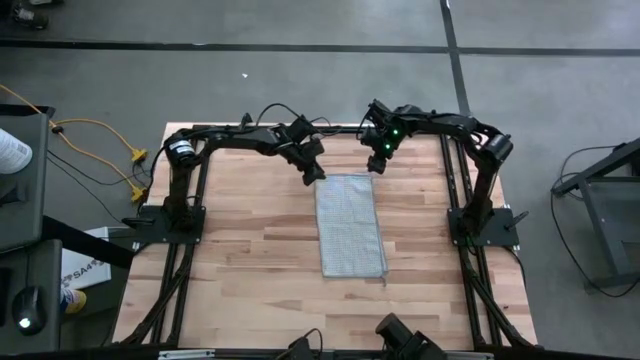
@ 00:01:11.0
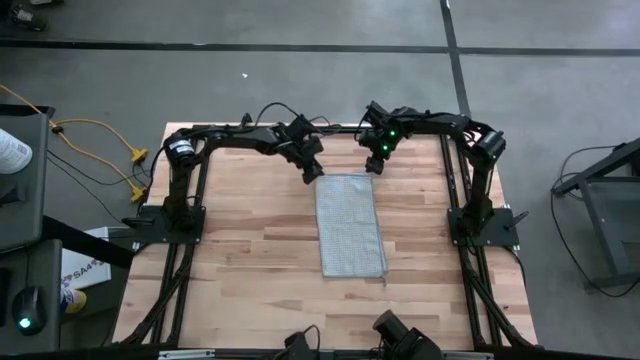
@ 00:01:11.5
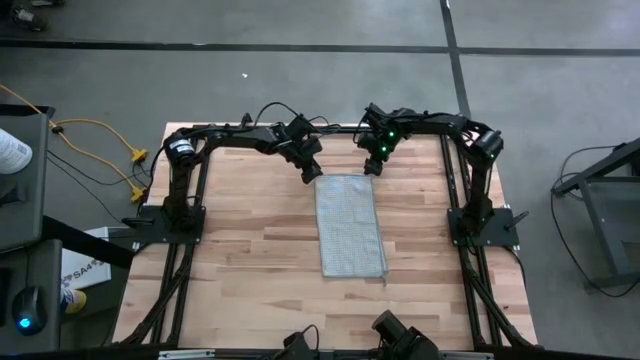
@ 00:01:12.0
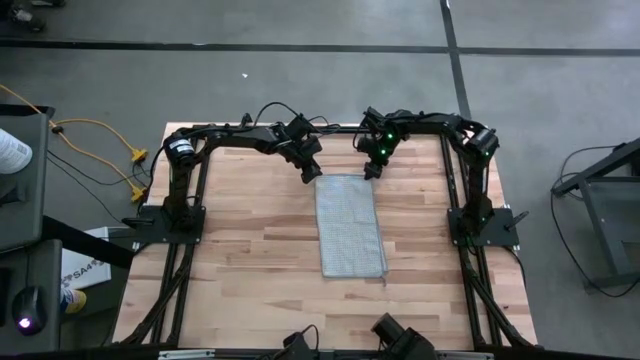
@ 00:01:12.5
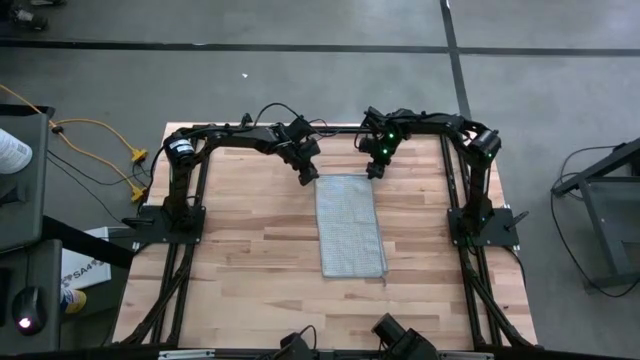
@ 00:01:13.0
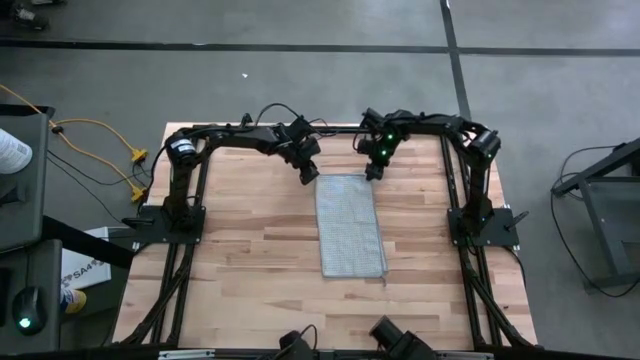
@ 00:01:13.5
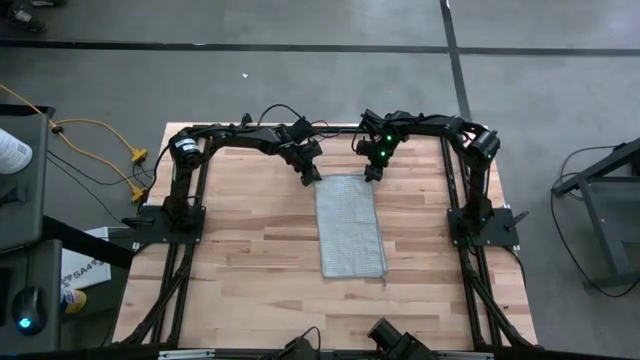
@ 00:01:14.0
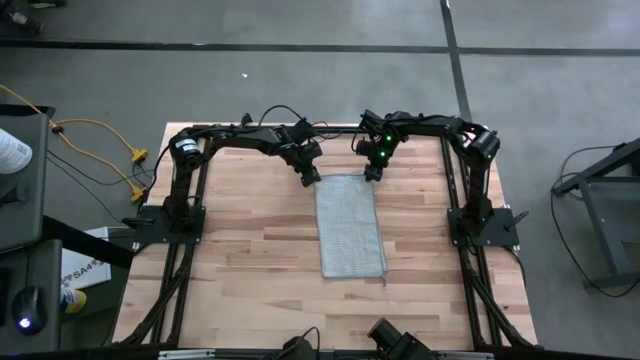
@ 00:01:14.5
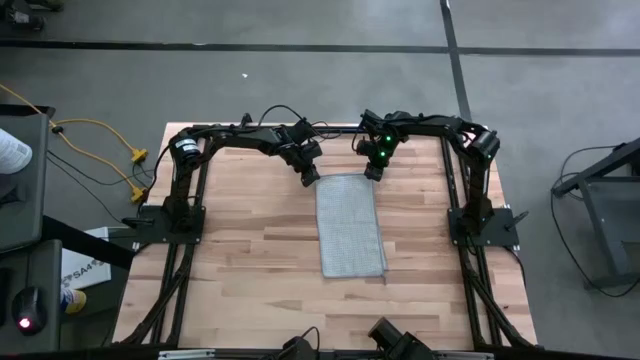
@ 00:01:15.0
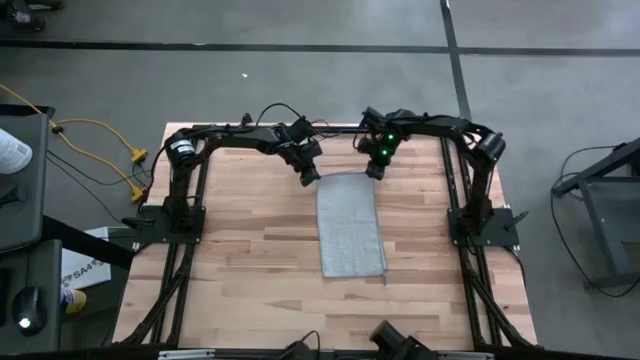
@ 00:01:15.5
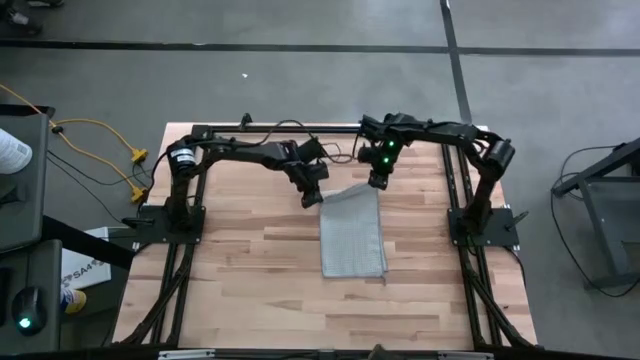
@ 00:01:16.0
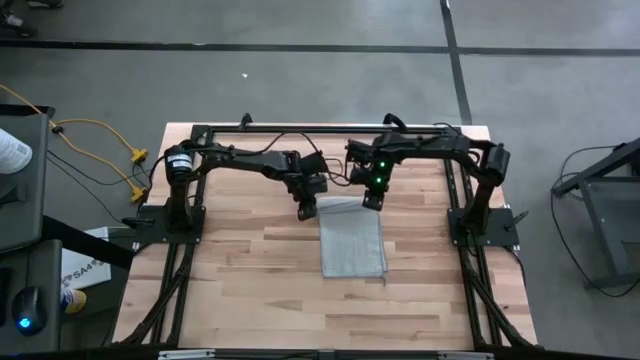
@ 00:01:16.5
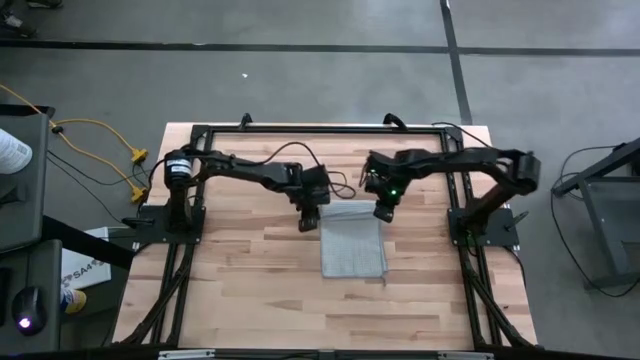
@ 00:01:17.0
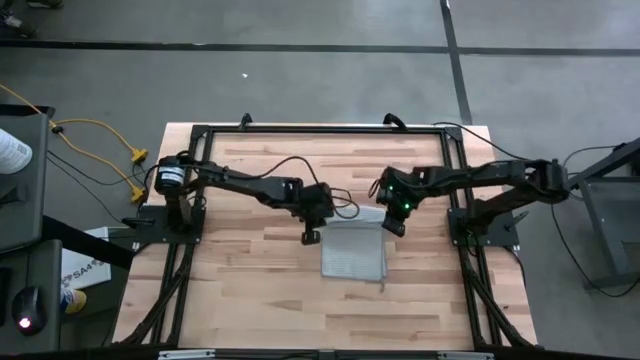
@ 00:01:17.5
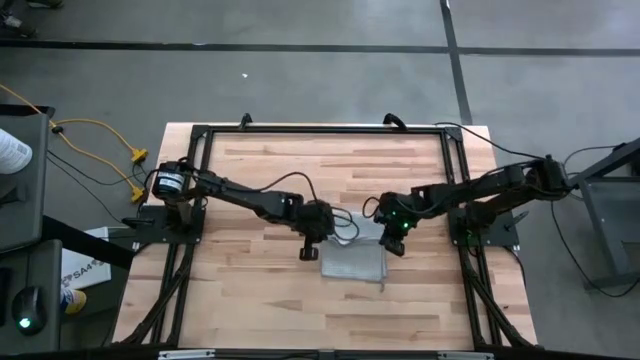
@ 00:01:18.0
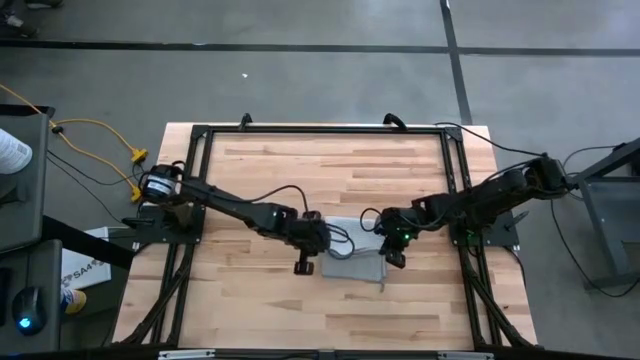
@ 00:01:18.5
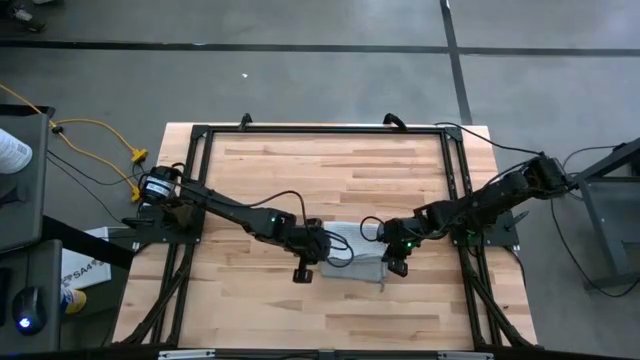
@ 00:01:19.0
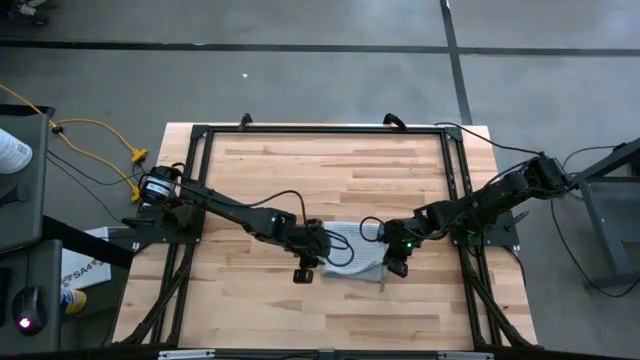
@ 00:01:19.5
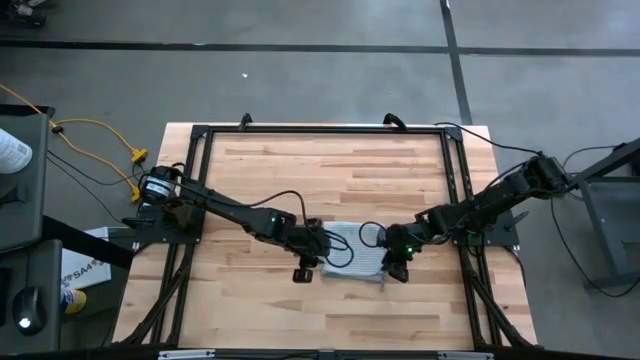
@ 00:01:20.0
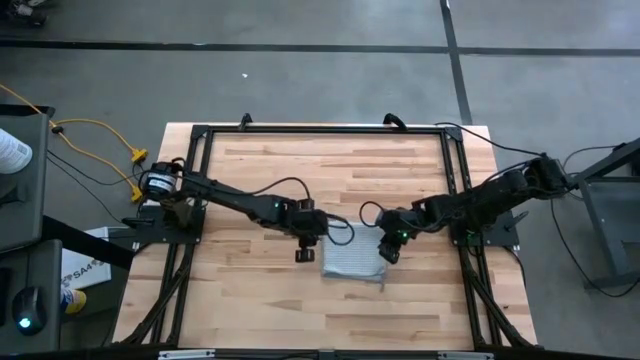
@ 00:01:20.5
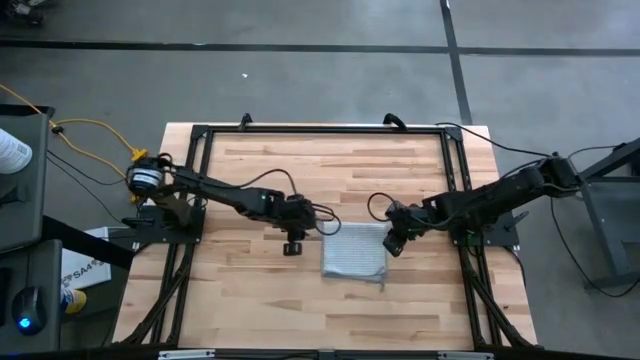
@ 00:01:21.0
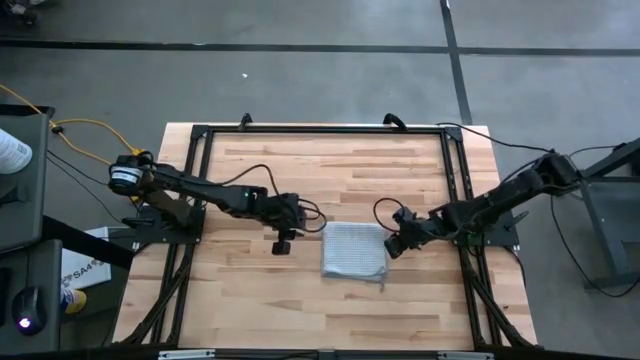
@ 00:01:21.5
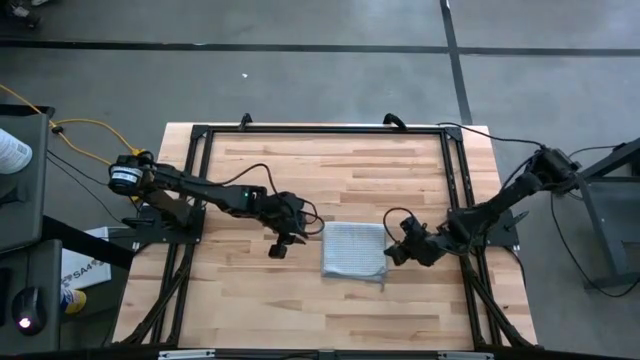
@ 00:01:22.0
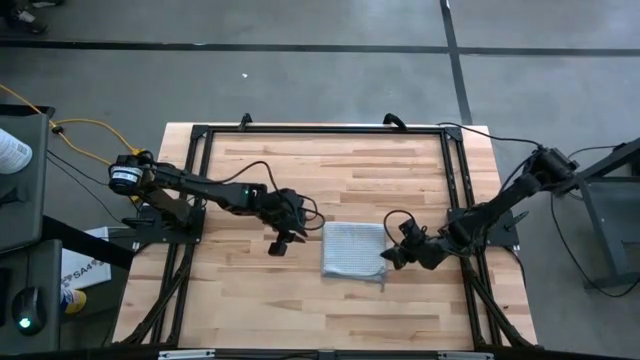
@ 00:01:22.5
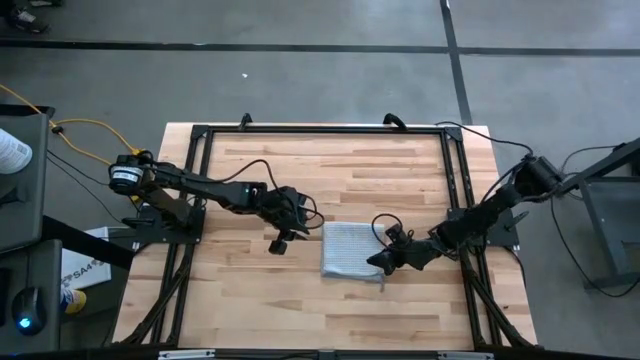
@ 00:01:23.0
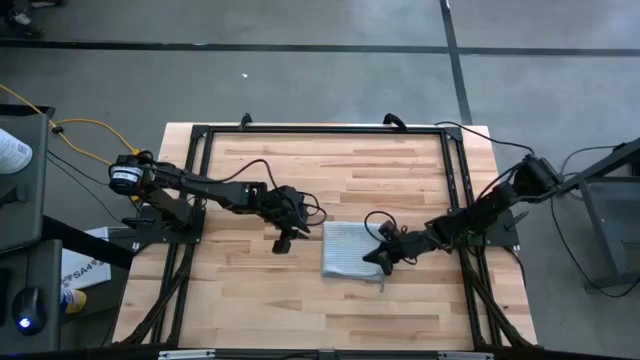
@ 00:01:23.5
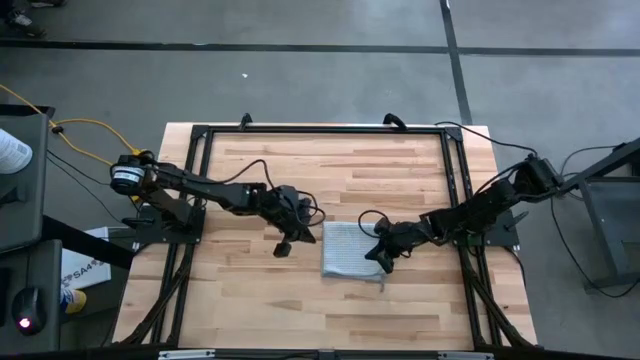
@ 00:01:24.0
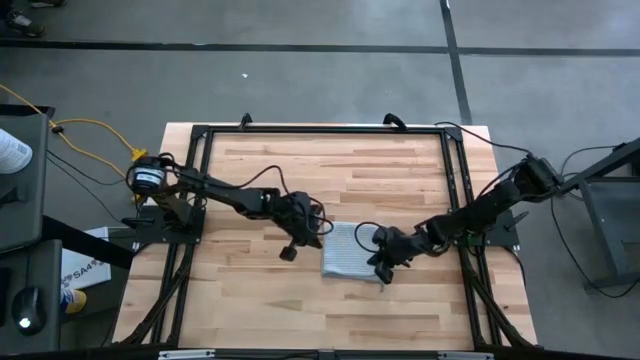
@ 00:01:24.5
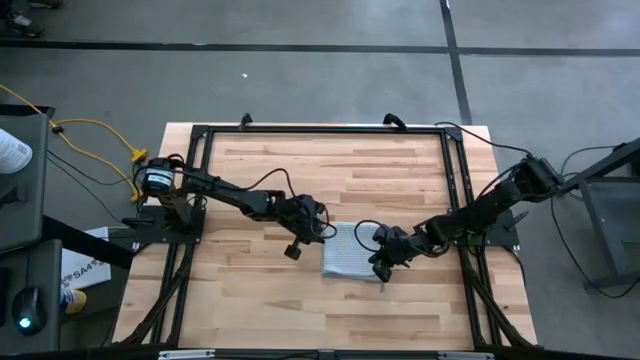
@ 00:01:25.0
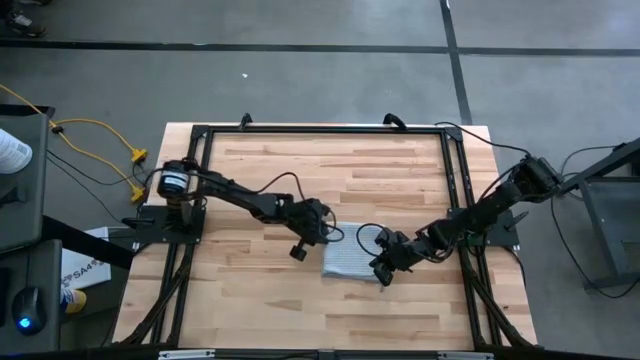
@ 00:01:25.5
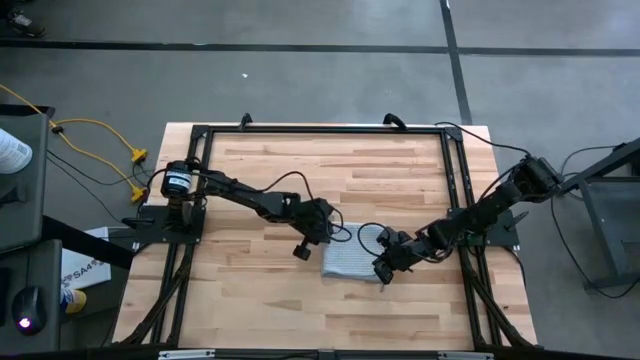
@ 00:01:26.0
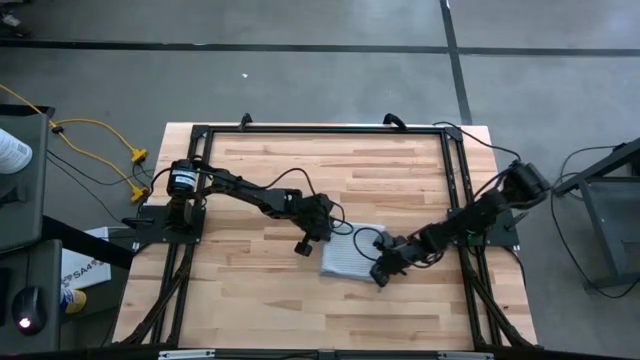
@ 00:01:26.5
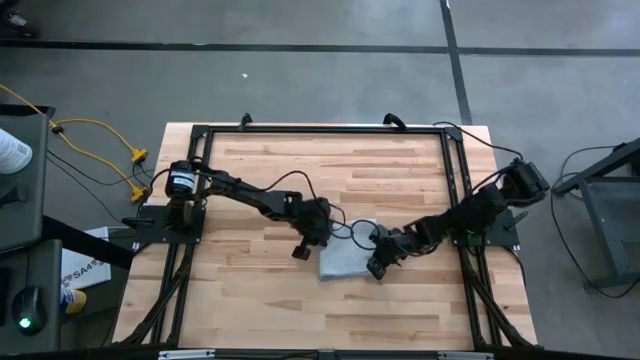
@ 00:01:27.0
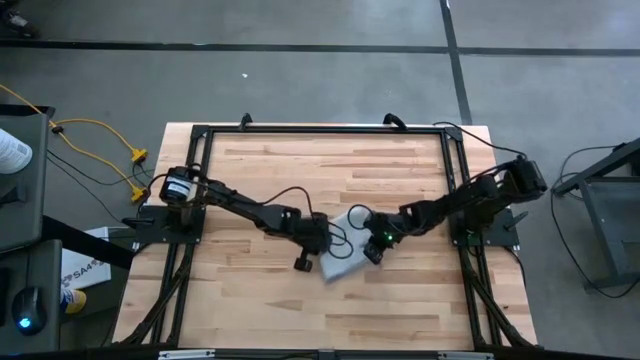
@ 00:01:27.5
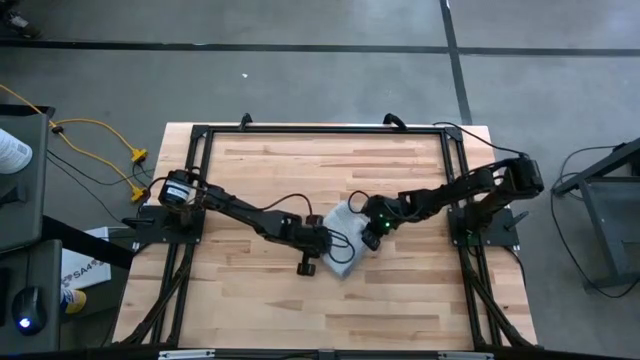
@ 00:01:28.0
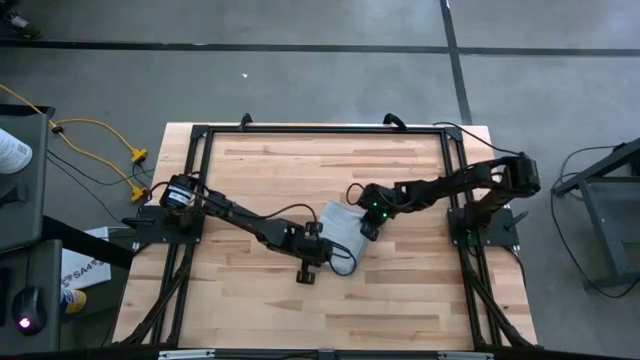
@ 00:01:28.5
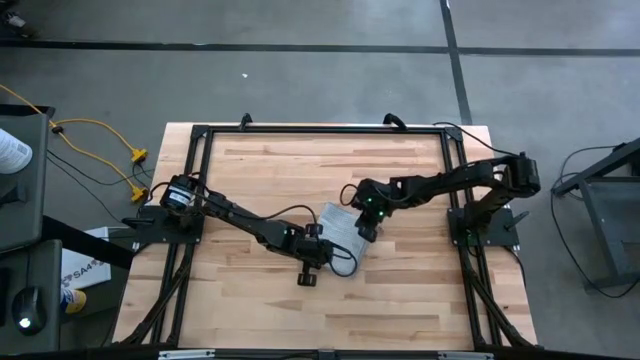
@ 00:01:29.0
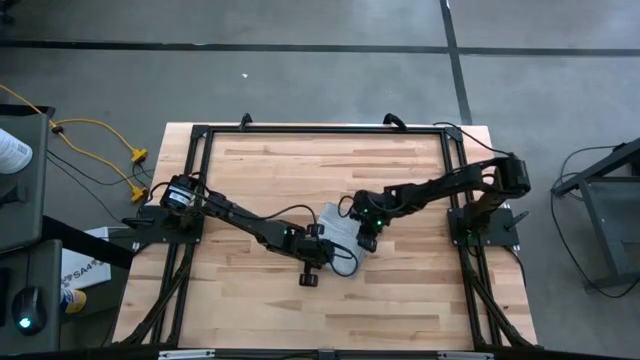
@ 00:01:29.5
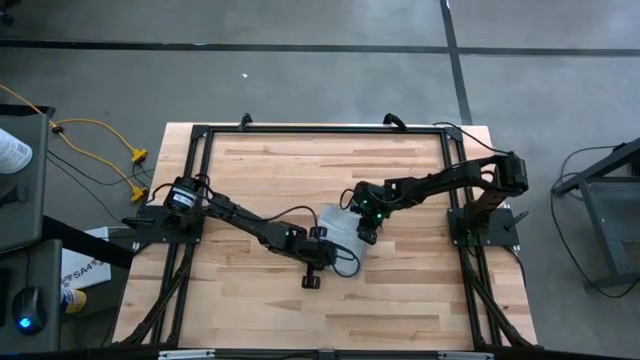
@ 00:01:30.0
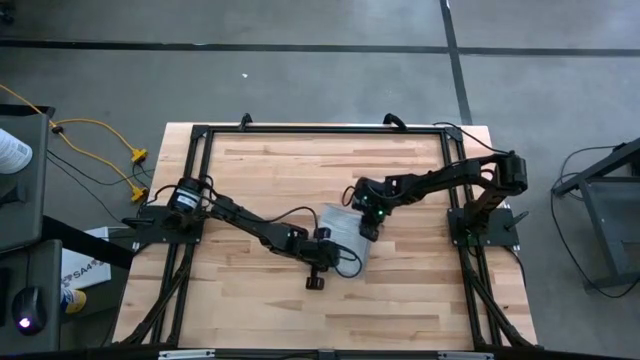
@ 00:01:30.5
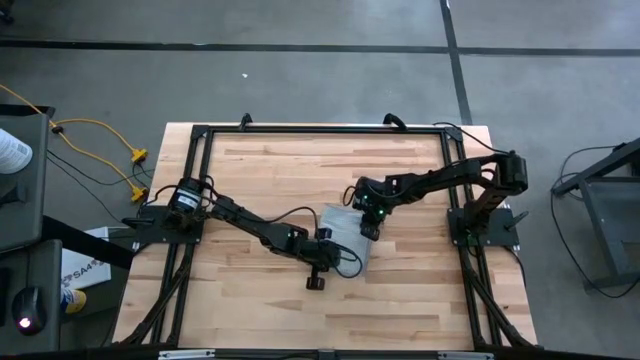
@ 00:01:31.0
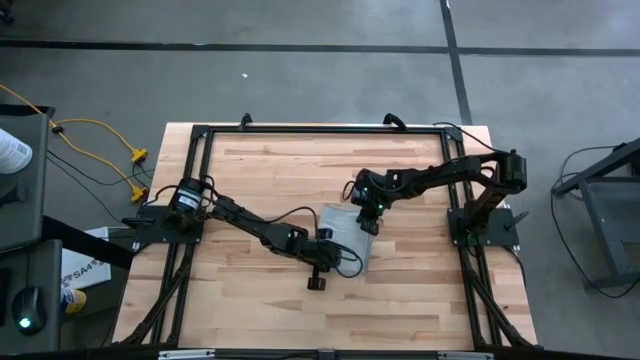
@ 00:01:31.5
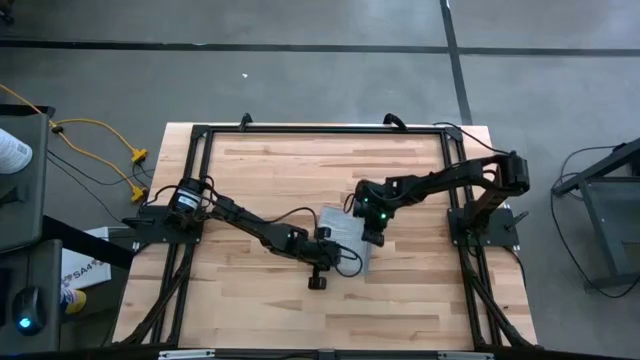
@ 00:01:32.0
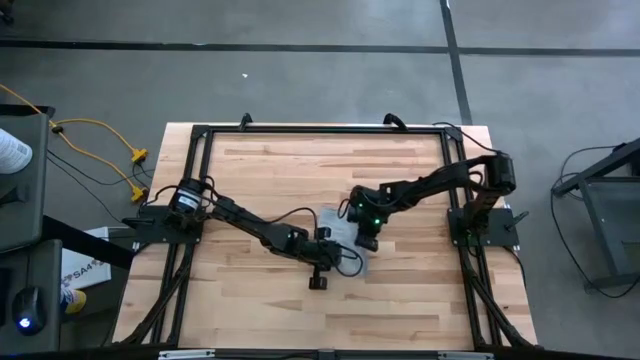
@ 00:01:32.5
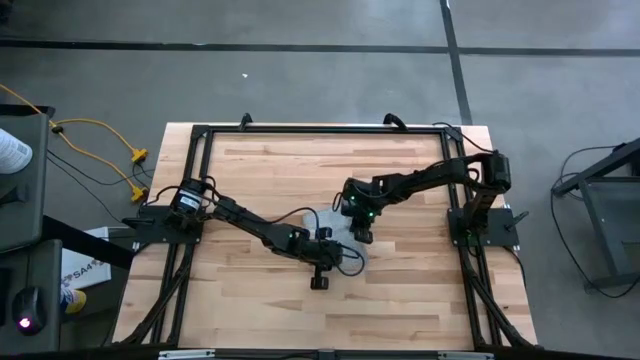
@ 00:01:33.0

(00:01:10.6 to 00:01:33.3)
Task: Fold microfiber towels
Fold the gray towel on the table
